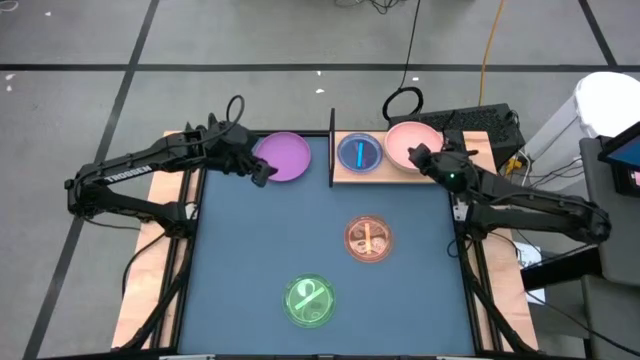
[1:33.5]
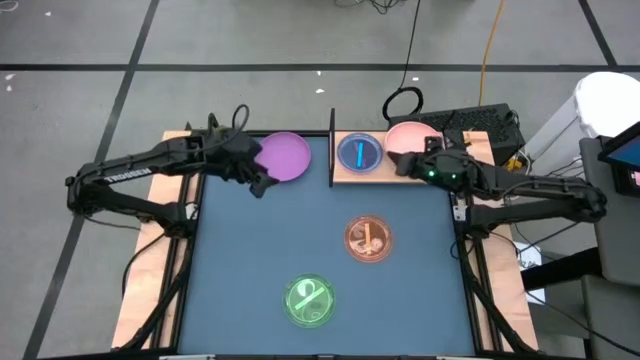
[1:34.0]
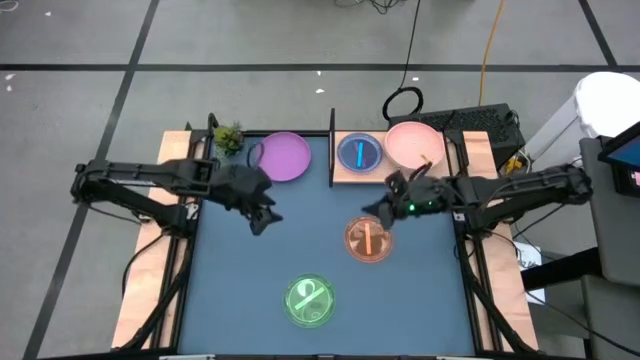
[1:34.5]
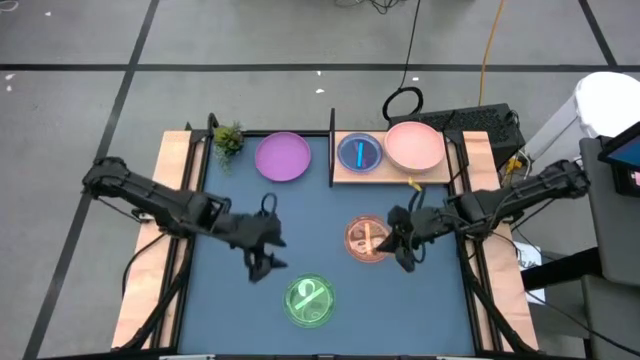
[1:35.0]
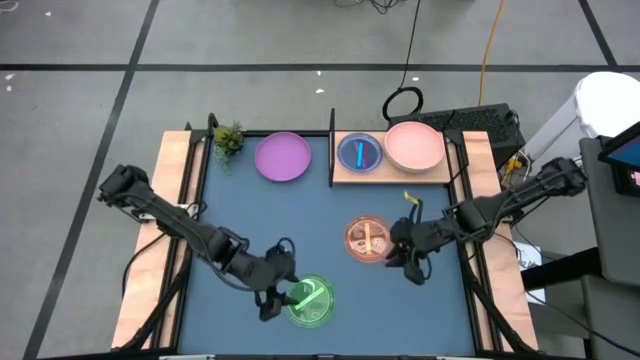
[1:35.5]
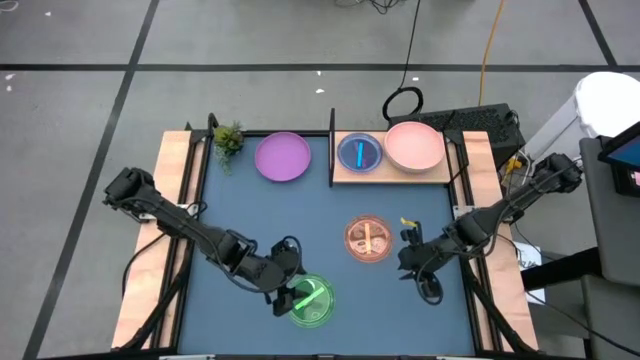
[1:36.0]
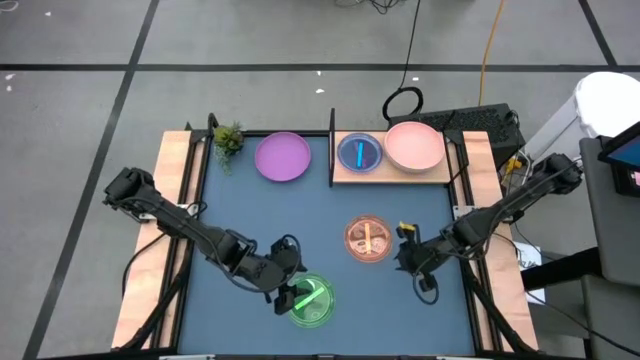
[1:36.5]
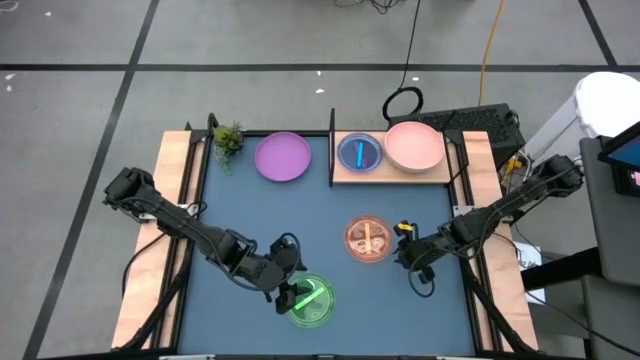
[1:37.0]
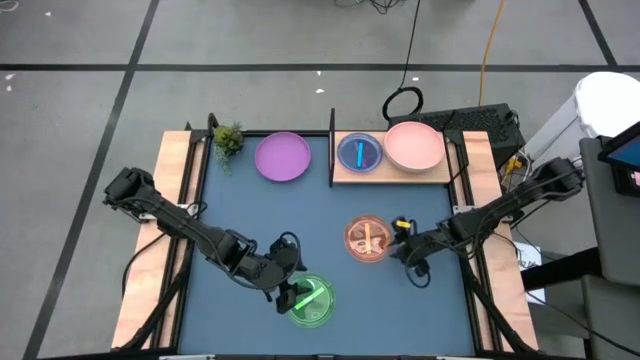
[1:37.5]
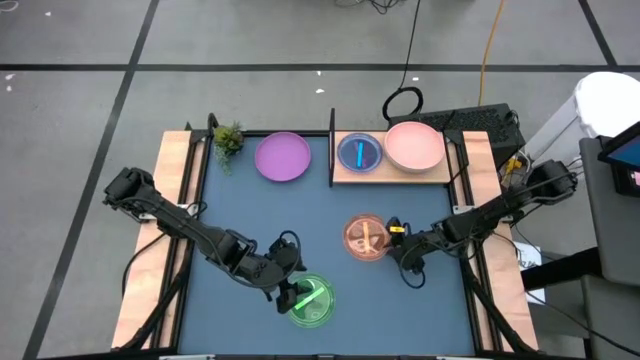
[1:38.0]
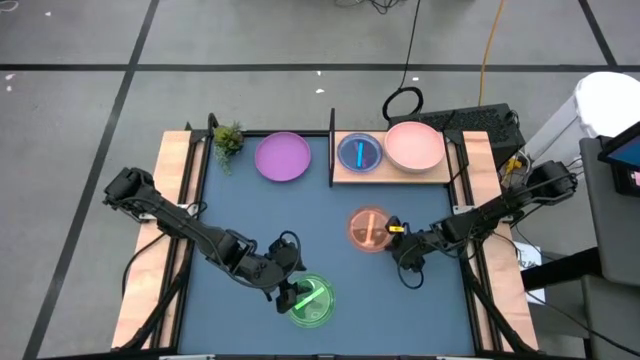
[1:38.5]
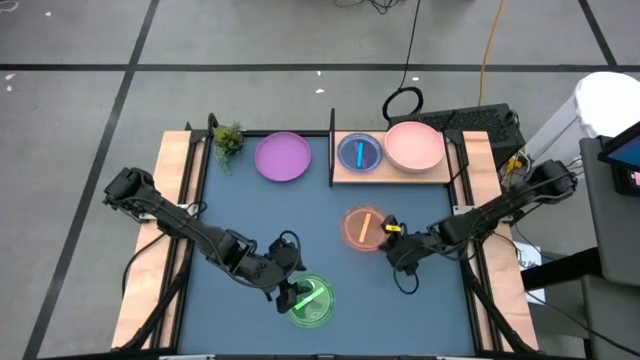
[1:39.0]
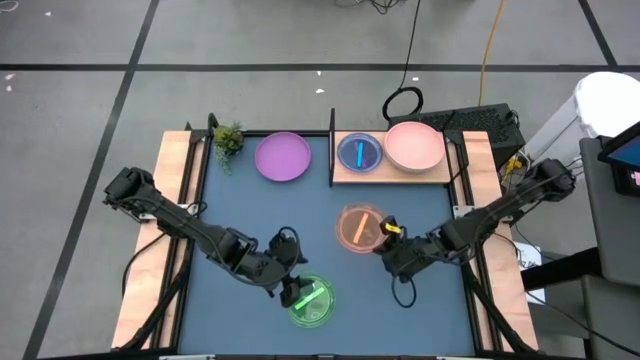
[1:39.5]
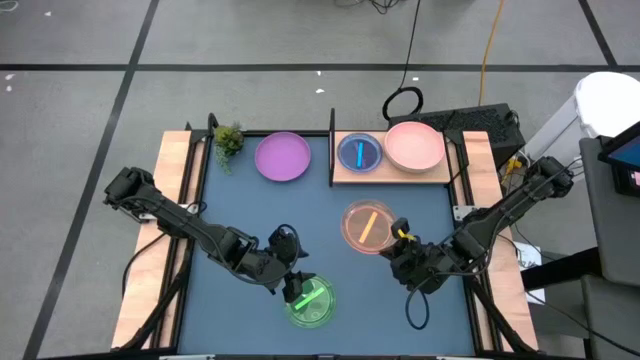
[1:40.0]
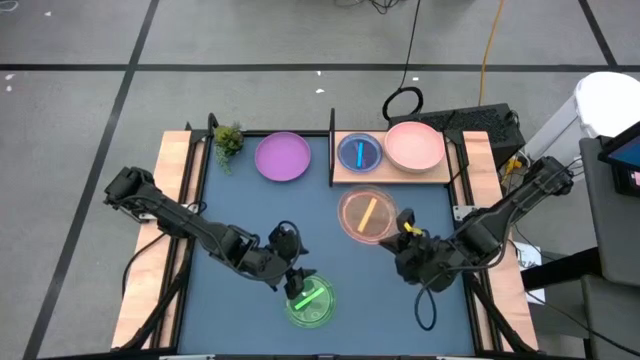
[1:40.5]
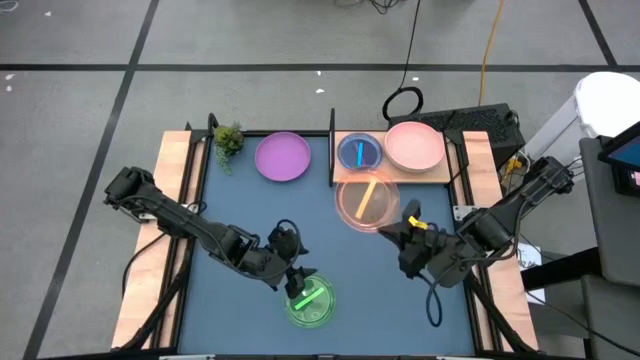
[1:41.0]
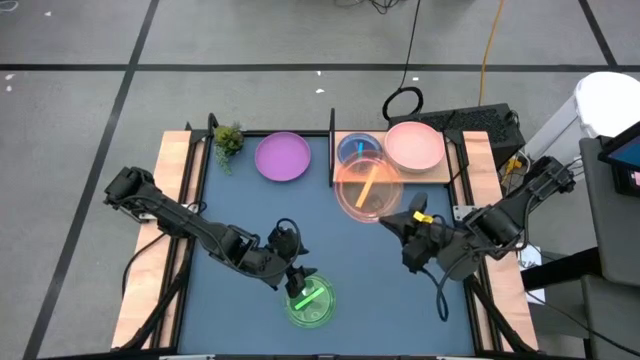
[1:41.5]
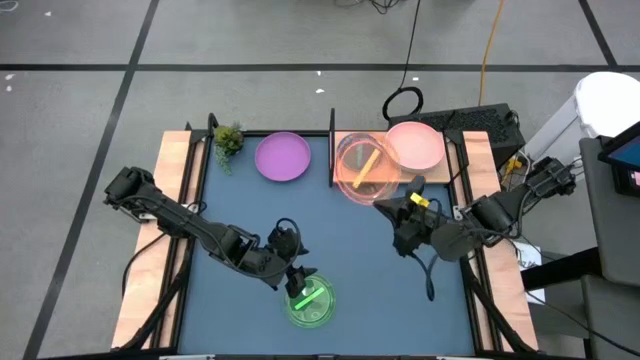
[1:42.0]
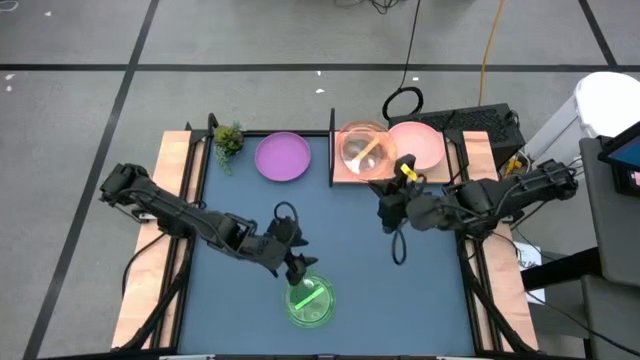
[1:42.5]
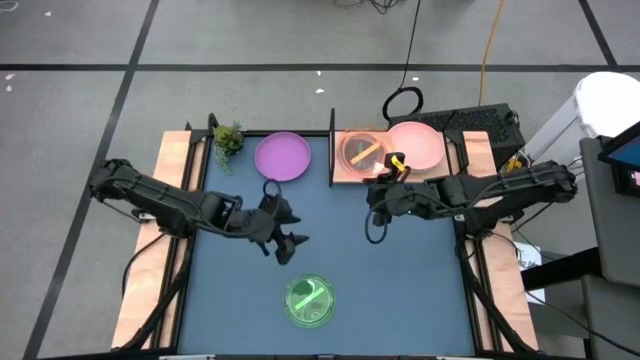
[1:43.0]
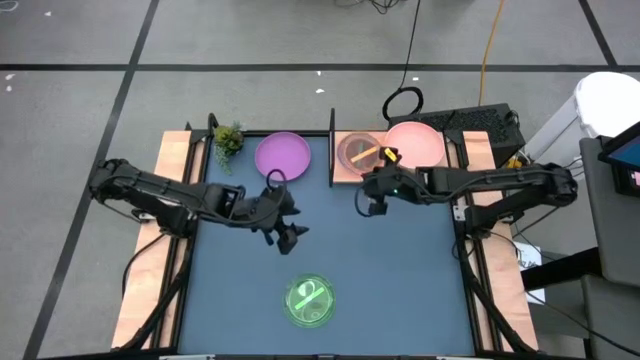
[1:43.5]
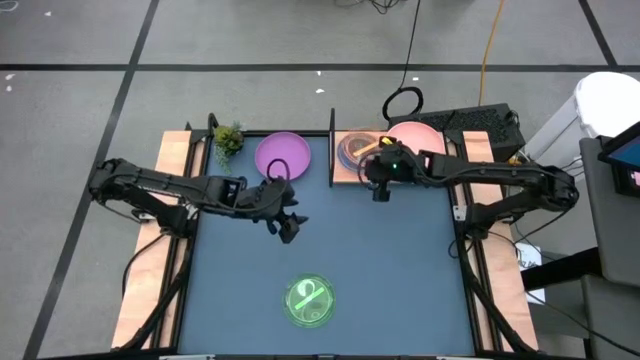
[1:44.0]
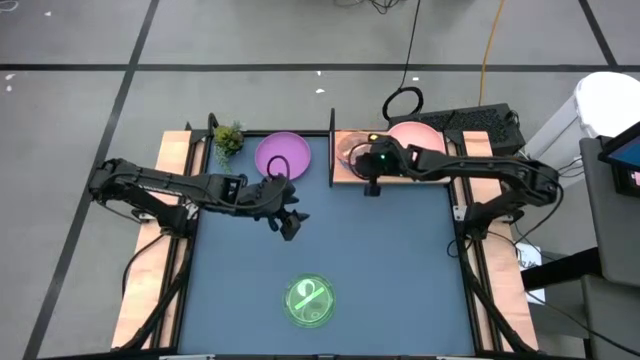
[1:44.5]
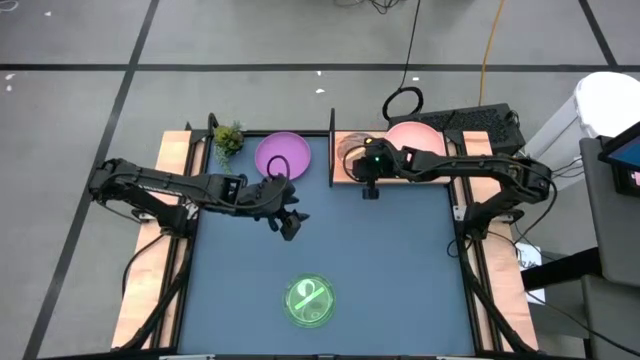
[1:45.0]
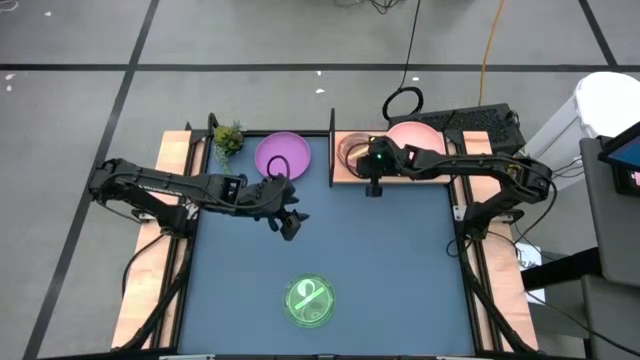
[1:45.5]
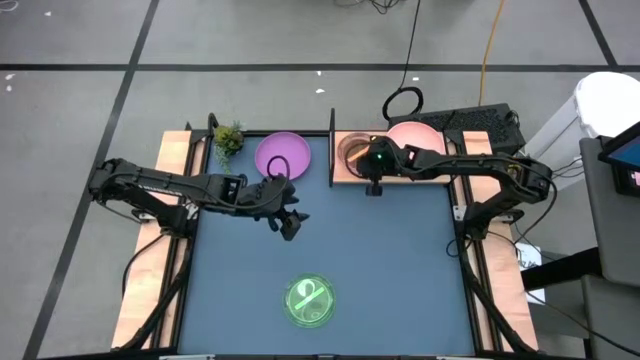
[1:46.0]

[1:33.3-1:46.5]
Task: Place and stack plates onto a shelf
Stack the transparent orange plate on the transparent blue plate on the shelf

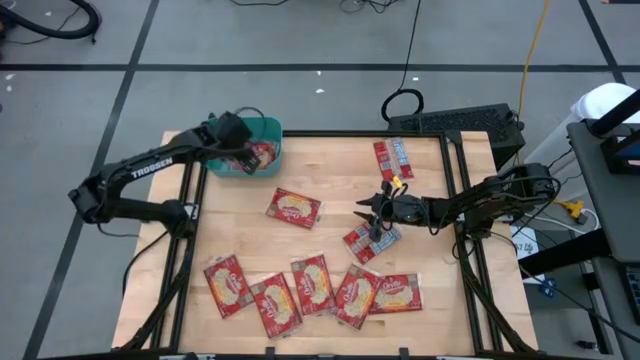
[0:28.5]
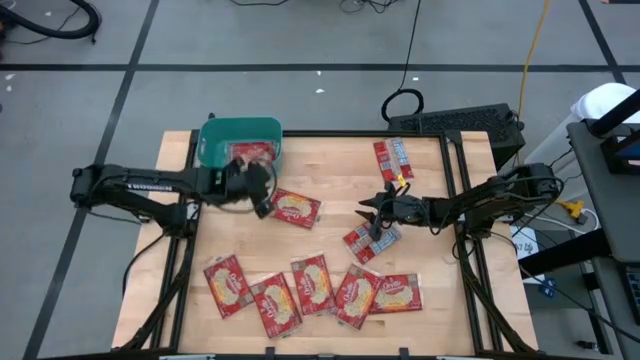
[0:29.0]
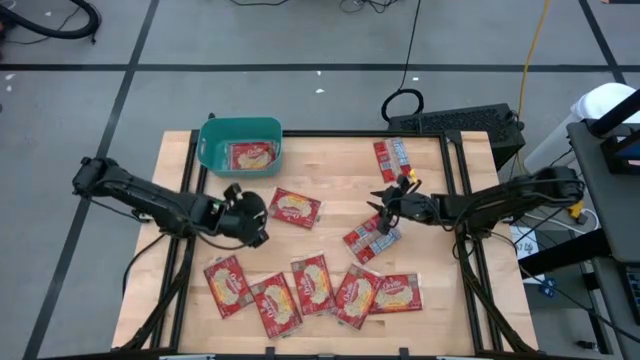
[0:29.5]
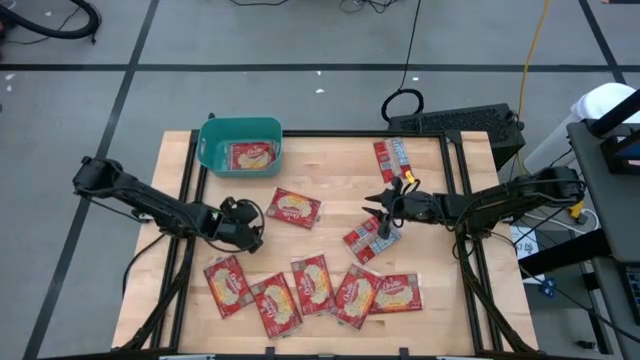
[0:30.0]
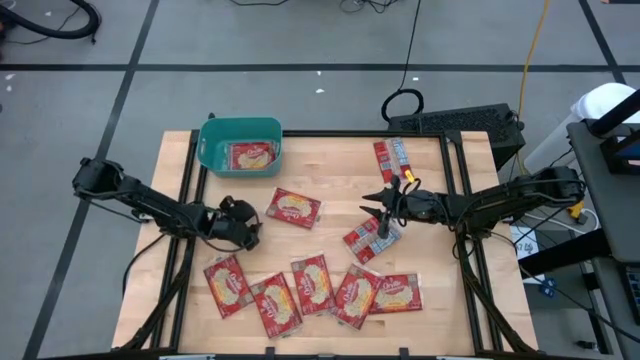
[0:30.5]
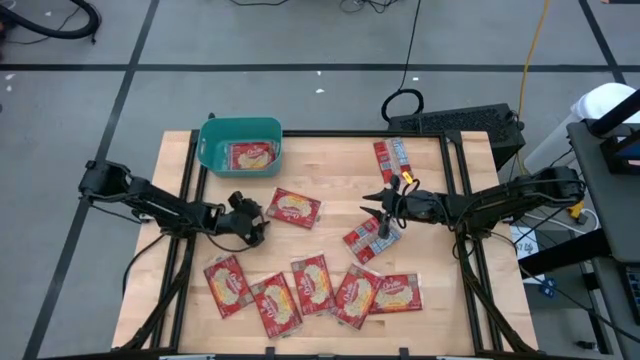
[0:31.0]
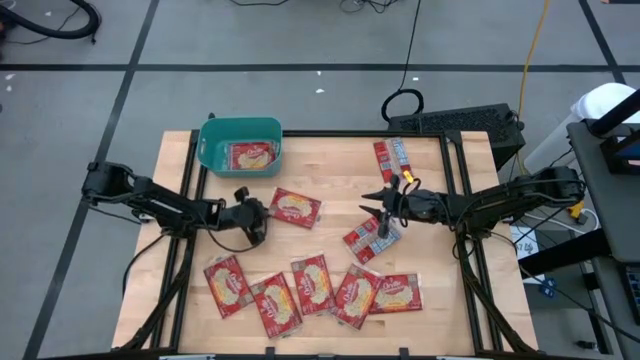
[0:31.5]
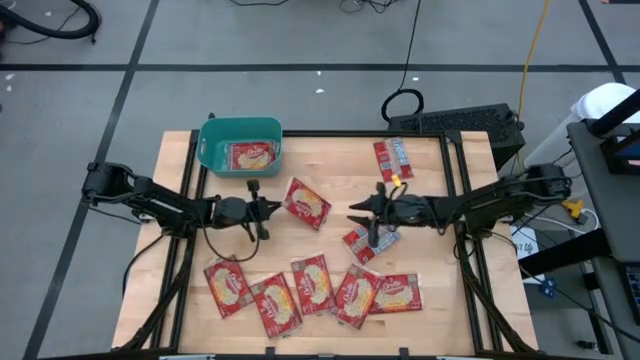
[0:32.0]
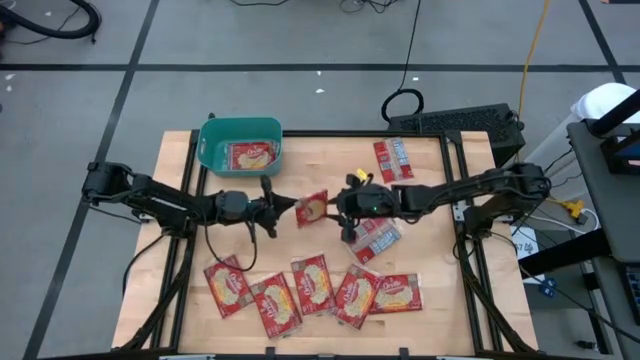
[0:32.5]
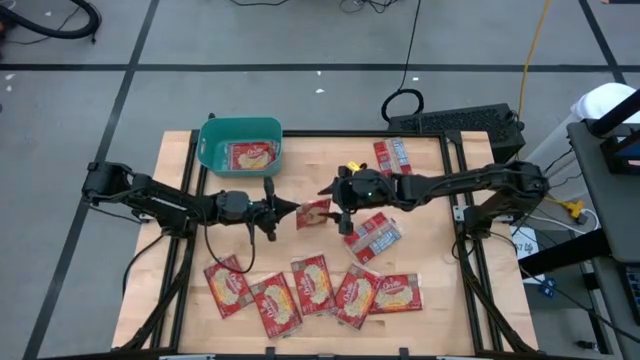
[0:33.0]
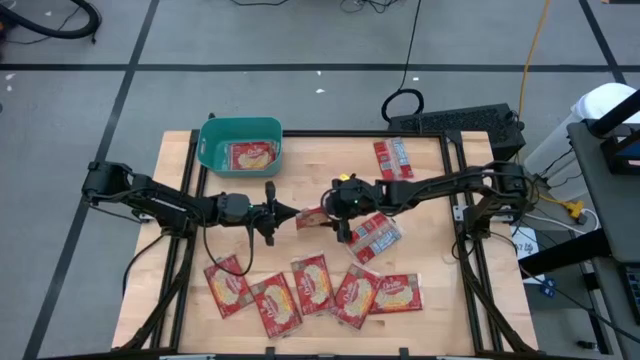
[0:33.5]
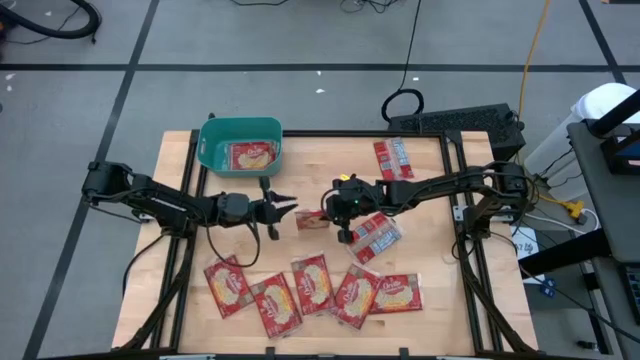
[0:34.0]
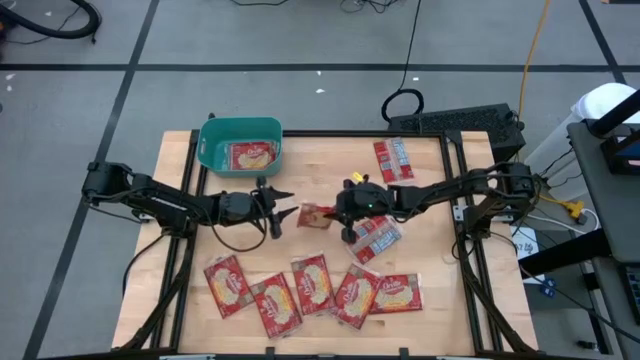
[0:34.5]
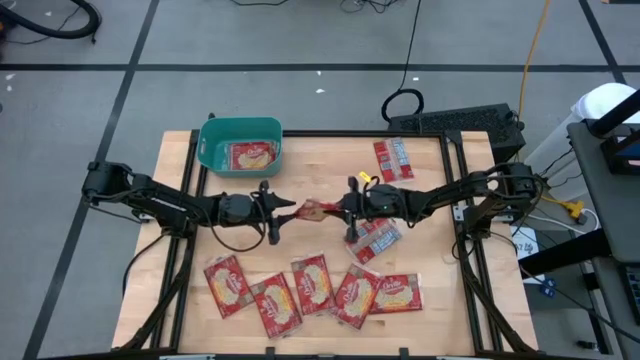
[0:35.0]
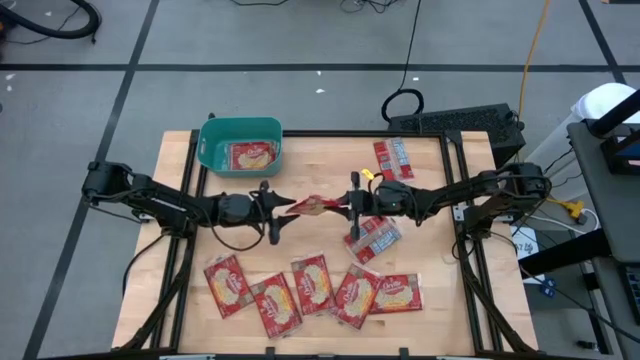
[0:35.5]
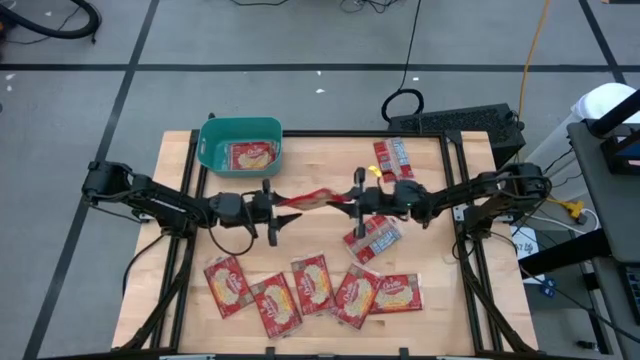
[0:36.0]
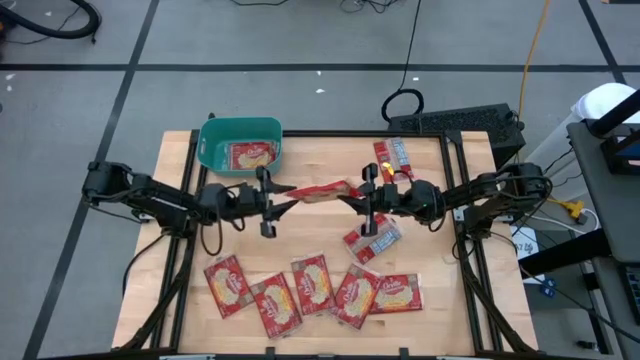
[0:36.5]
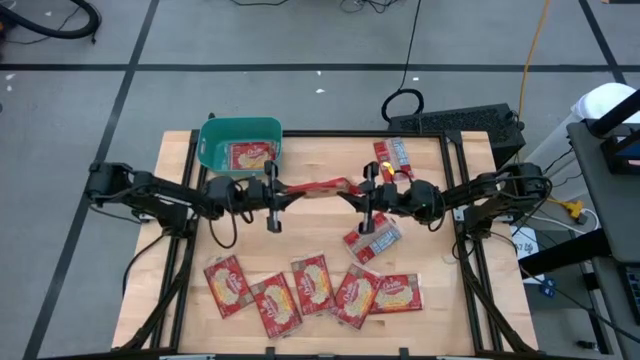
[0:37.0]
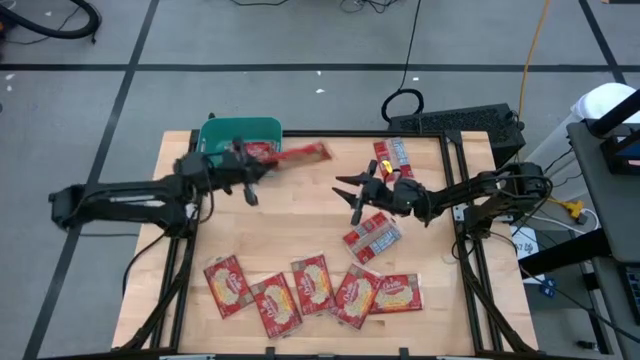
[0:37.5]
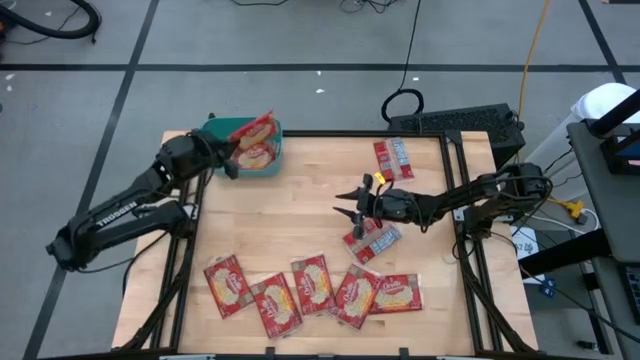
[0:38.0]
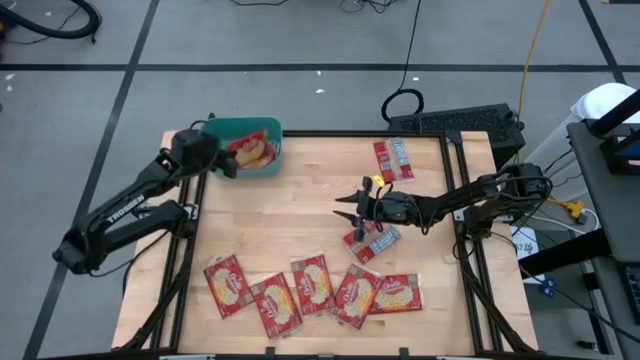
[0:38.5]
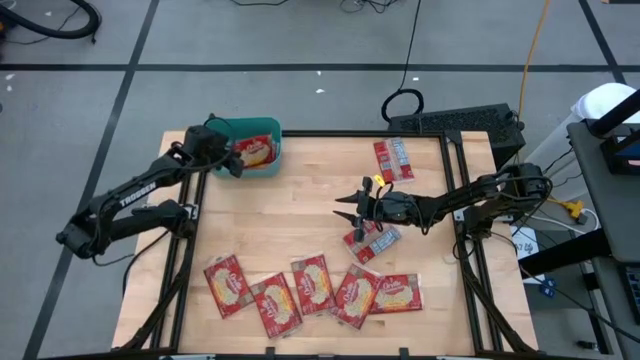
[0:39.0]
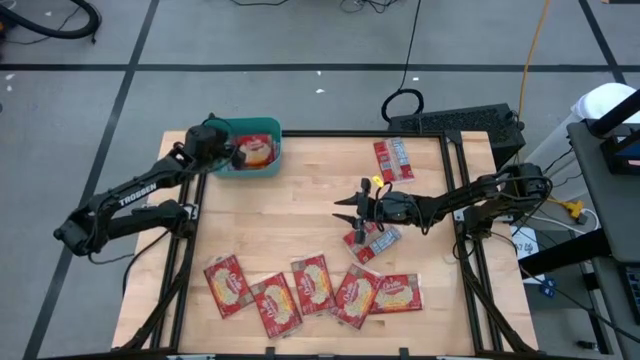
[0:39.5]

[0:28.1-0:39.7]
Task: Sort popcorn bags into baskets
Put the red popcorn bag into the green bin
